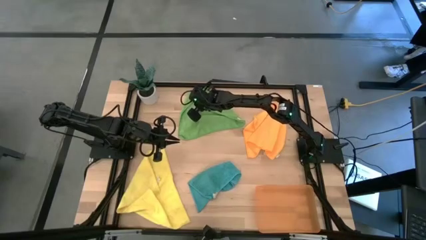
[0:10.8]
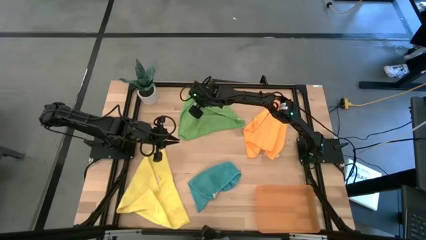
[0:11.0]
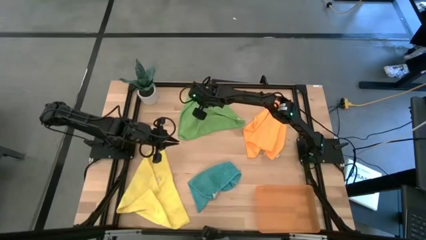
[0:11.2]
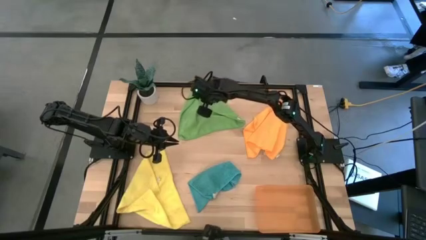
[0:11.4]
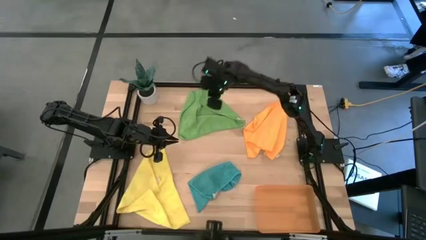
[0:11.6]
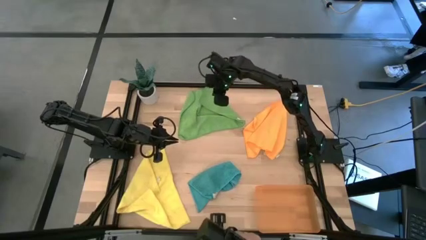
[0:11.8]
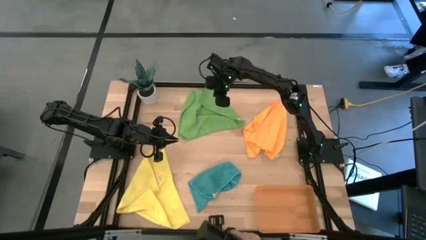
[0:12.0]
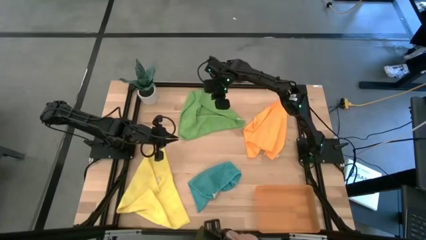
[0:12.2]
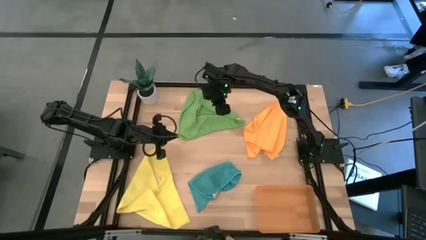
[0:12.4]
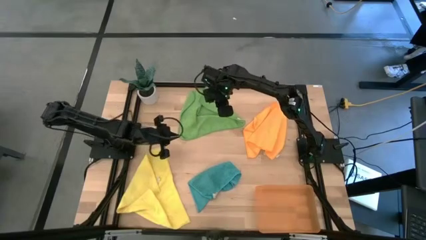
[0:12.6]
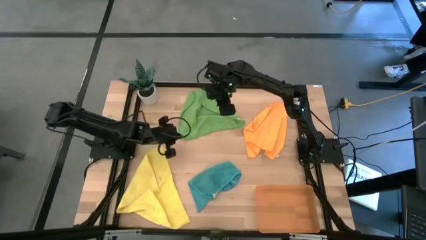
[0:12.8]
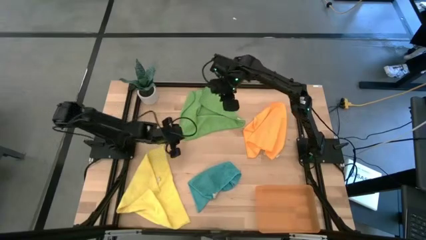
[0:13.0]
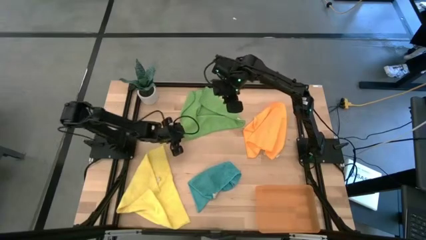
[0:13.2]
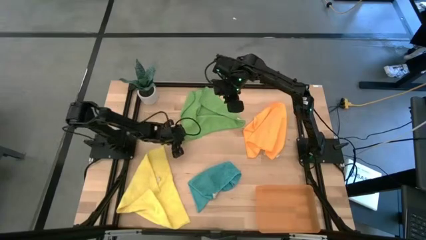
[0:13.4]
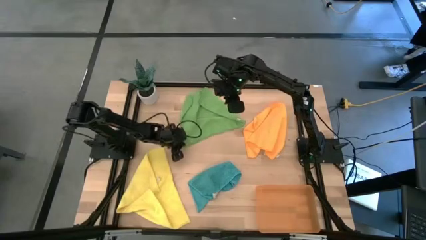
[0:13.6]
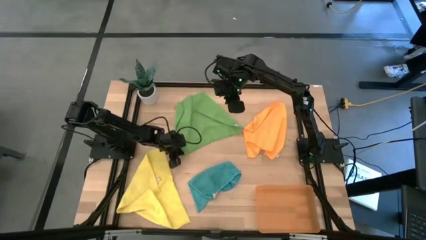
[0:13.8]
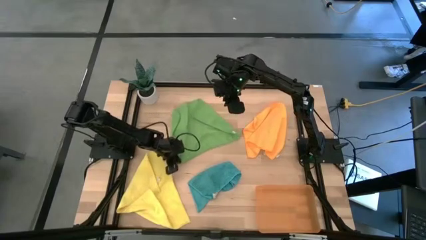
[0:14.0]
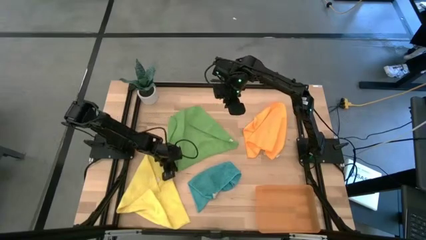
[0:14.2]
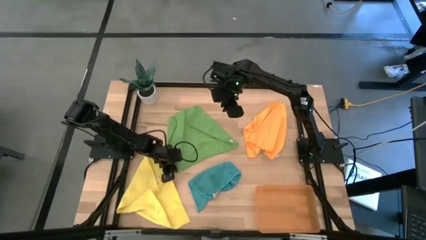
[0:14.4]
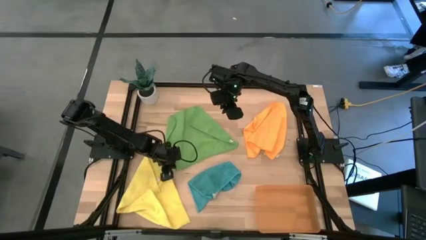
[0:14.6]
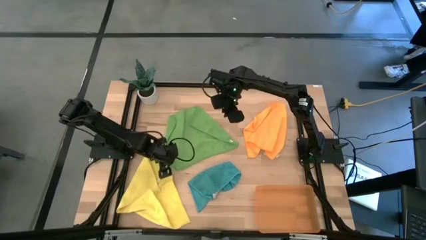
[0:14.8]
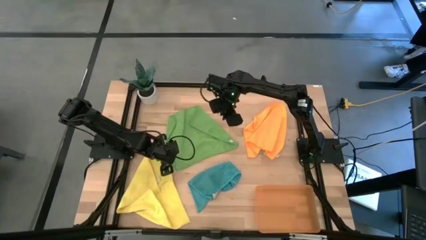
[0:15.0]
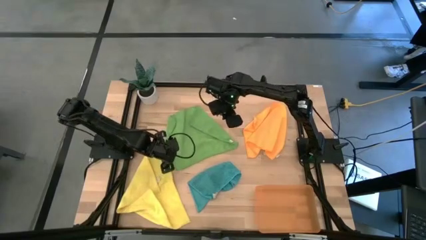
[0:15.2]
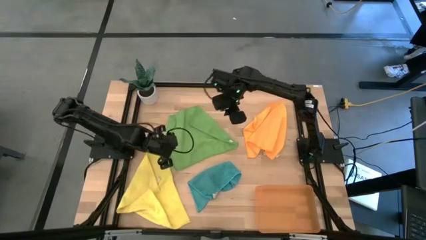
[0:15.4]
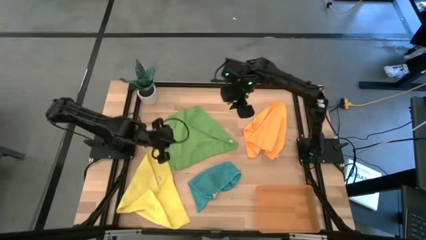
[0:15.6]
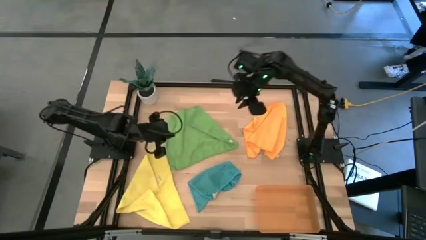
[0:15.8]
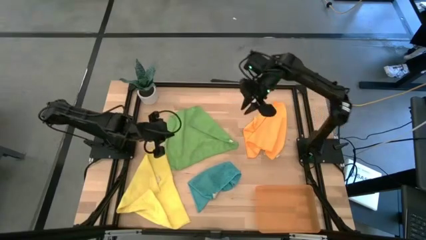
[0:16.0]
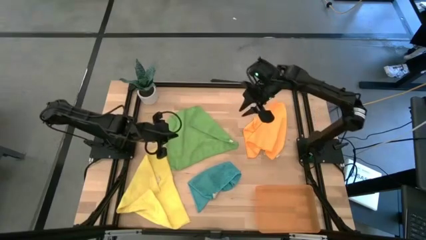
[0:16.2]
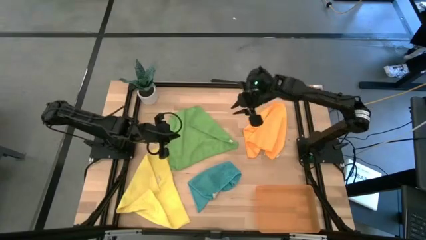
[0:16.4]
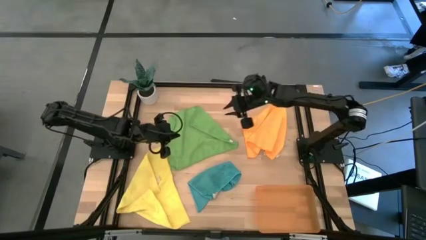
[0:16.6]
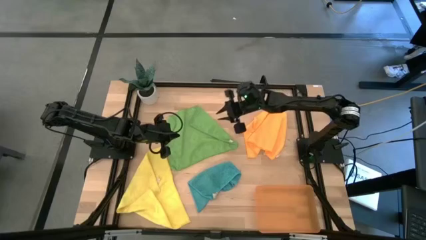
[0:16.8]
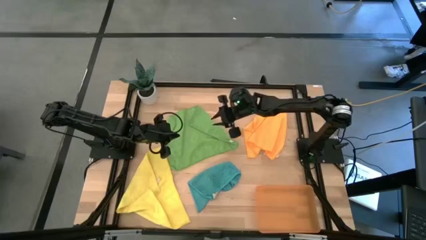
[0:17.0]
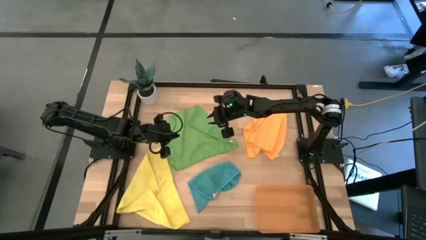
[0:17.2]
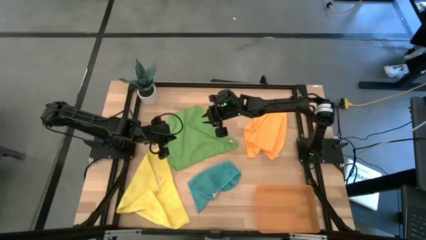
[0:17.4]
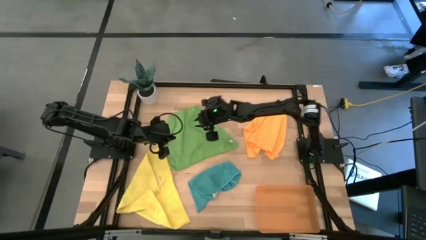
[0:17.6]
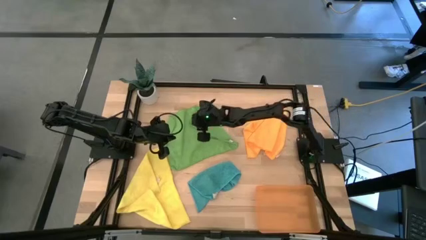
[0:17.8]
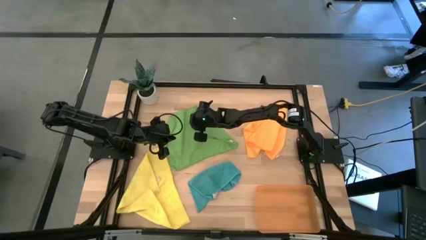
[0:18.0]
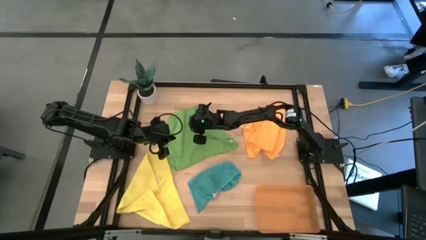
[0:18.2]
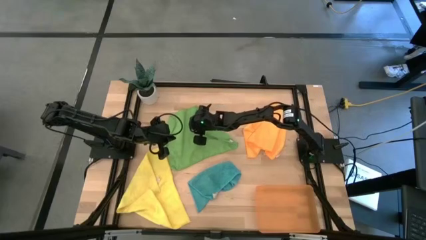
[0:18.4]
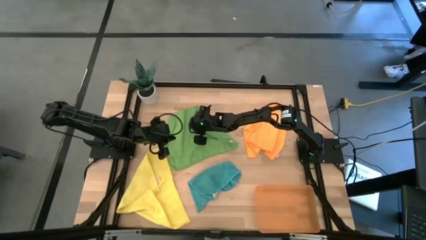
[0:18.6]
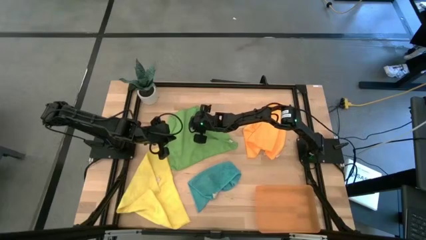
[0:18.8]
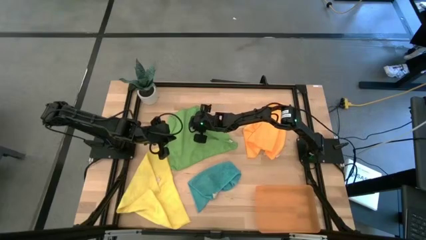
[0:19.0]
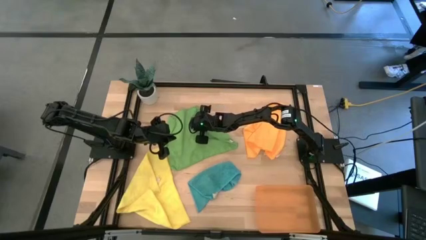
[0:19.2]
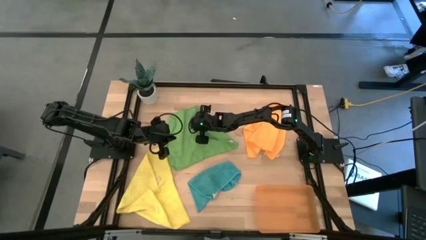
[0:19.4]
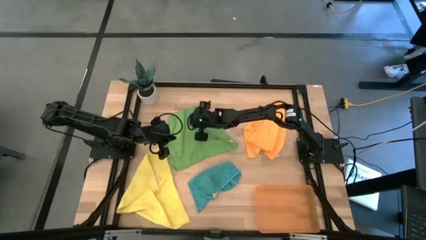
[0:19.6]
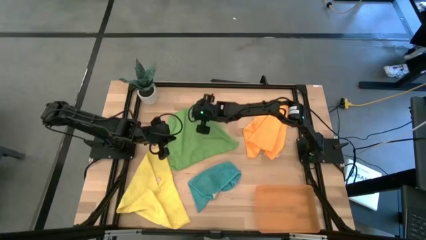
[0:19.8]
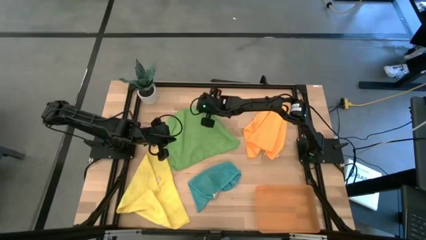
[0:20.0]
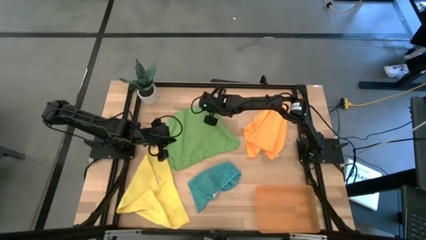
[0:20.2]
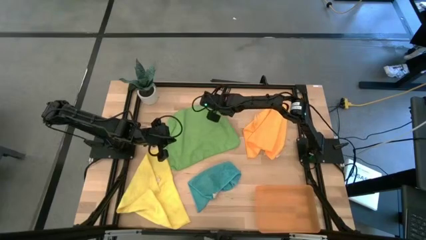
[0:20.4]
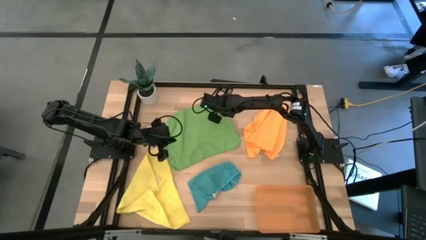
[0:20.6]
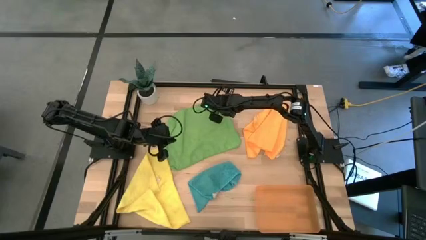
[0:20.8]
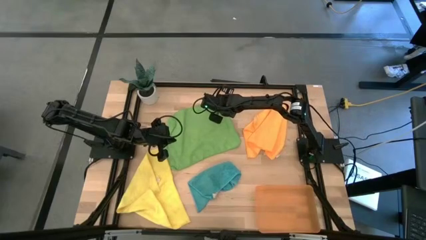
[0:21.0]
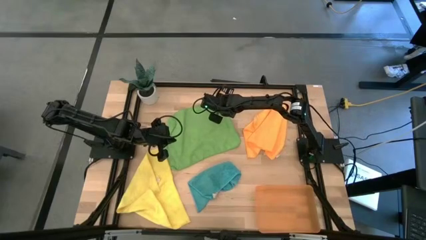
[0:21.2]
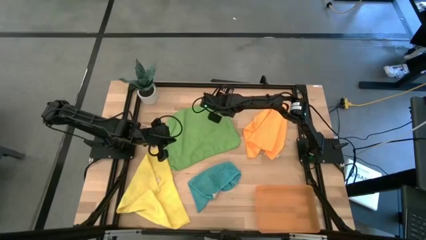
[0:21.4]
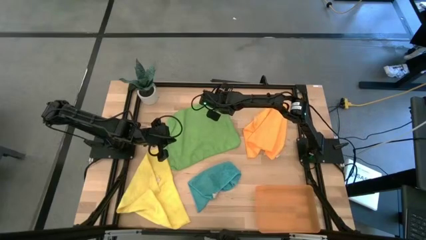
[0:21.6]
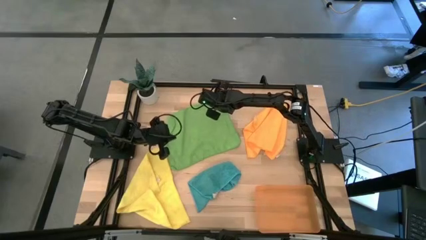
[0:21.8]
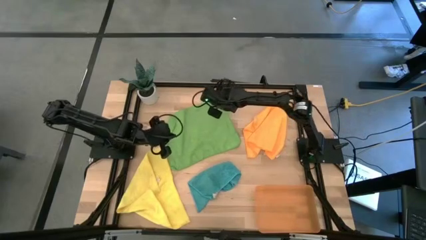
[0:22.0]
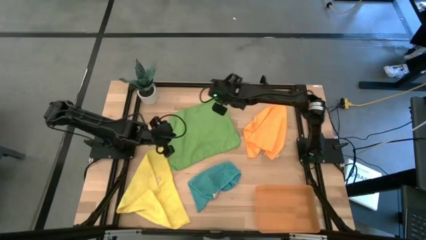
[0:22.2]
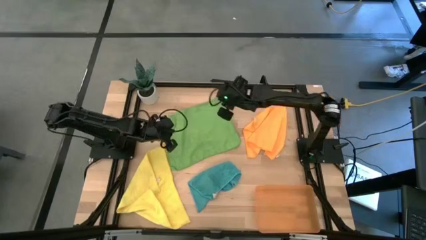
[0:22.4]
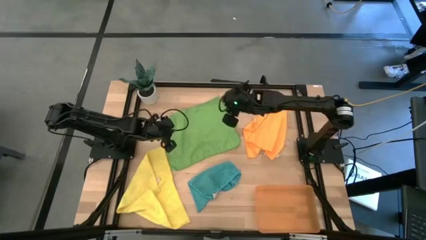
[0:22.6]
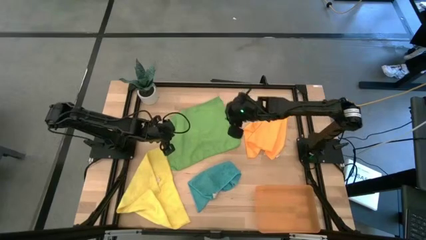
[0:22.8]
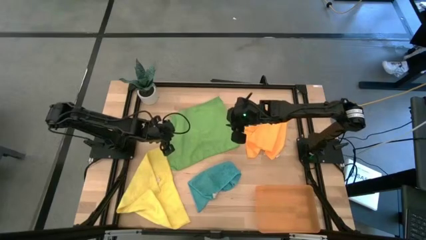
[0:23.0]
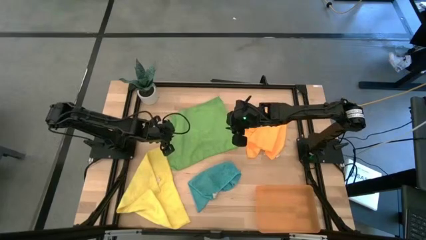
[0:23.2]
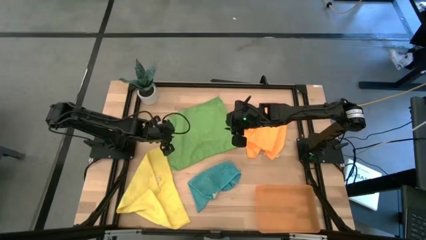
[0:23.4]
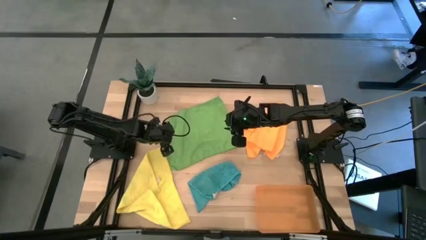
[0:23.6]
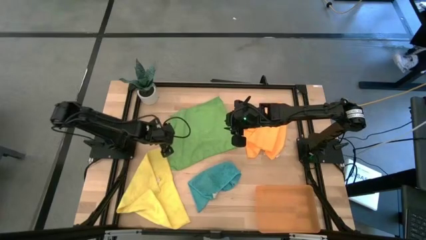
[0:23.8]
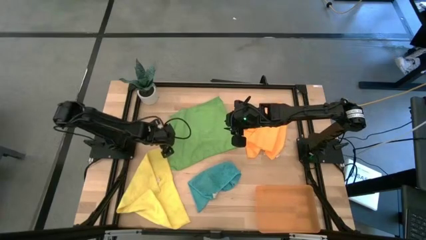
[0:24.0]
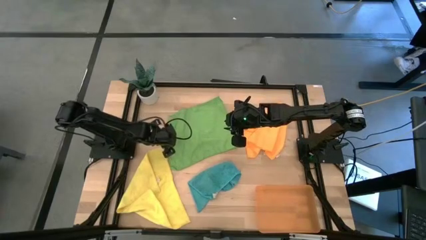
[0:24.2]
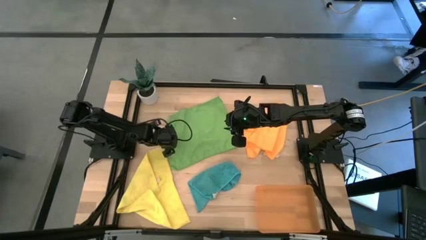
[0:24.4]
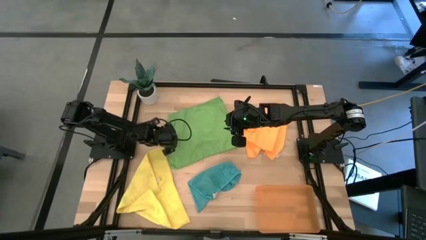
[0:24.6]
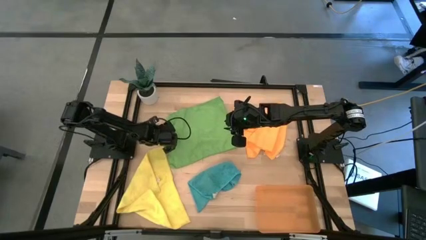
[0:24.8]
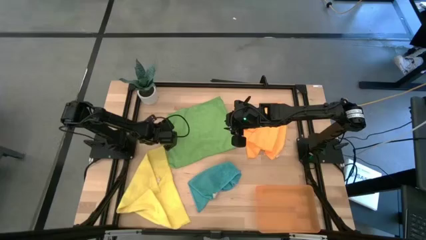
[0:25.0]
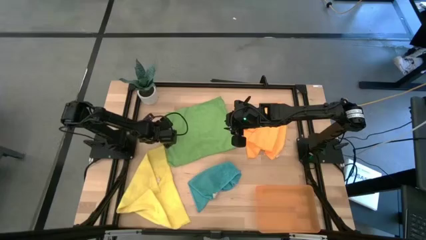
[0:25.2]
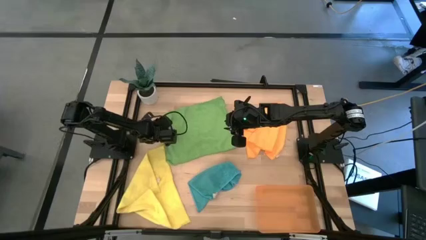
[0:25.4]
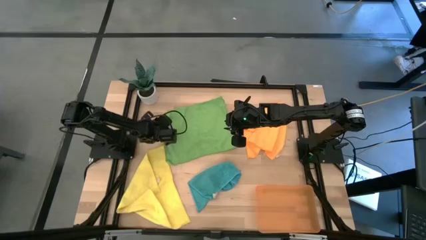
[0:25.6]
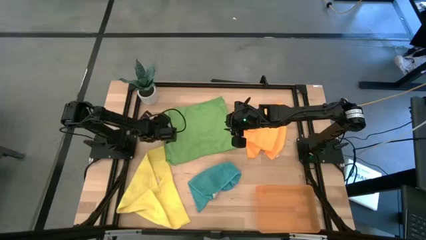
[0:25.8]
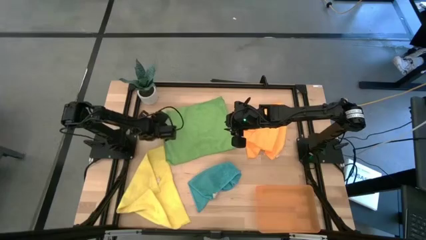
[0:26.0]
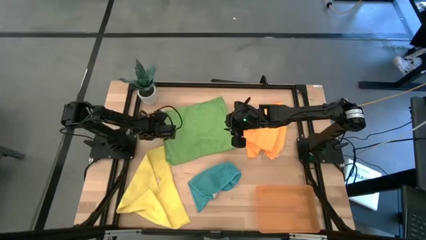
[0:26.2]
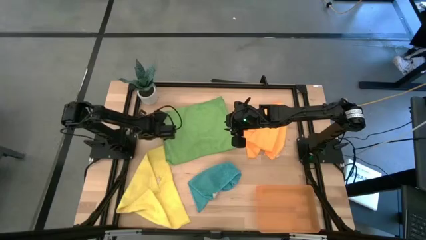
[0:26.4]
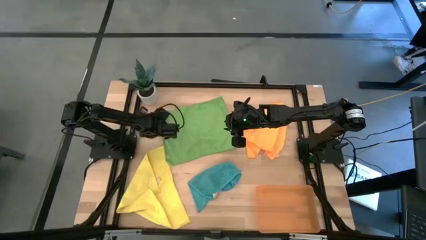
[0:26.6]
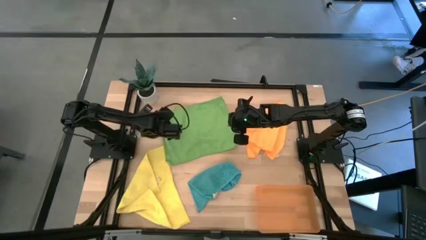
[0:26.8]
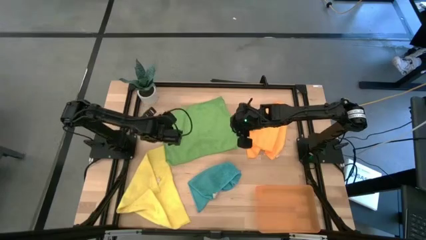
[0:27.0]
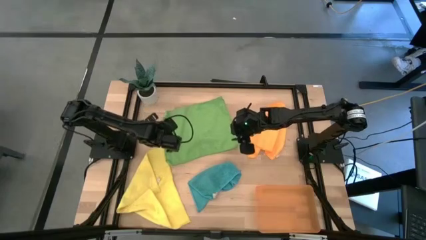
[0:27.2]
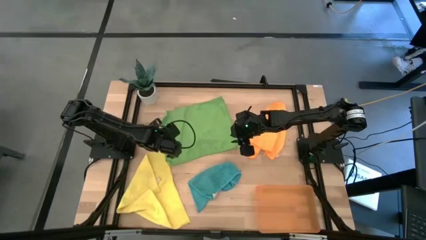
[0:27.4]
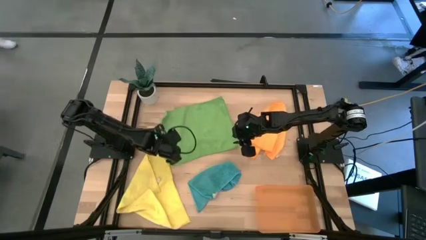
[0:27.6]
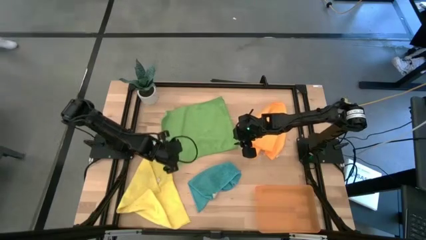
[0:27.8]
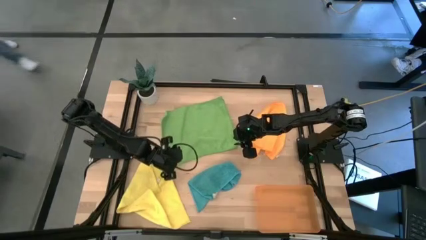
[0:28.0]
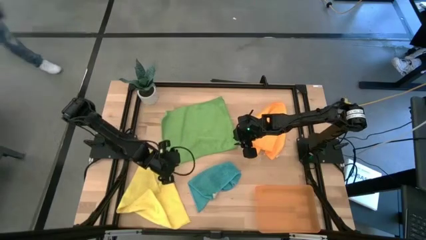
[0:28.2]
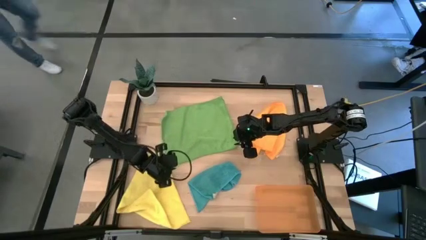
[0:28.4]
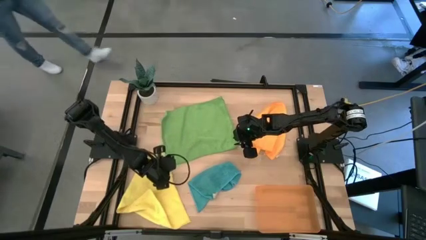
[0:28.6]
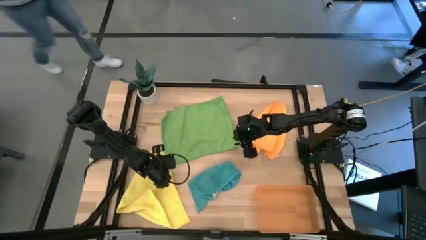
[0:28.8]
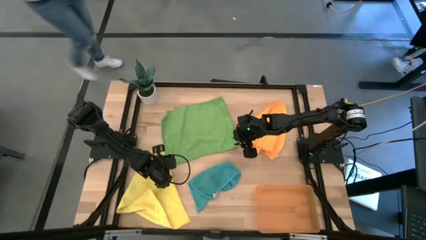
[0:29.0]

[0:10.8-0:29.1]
Task: Roll microfiber towels into tight, uniform cylinder then place into a basket
Roll the green microfiber towel
